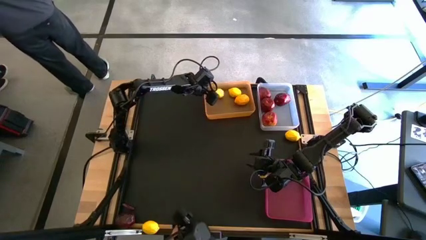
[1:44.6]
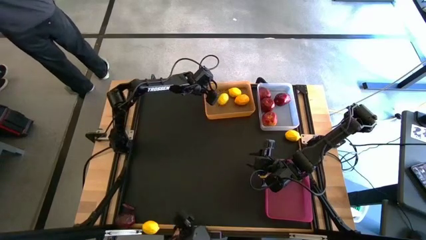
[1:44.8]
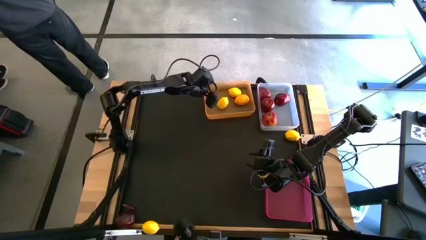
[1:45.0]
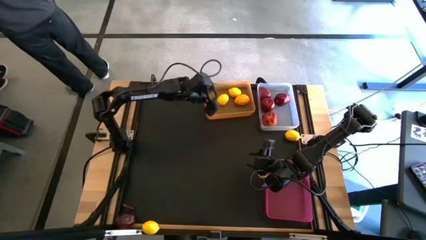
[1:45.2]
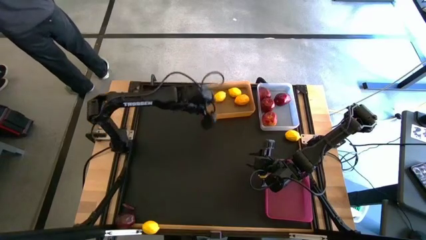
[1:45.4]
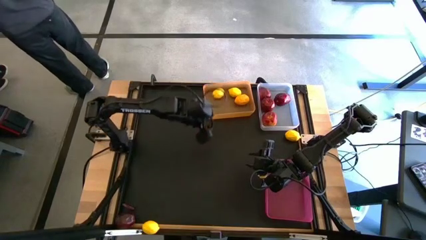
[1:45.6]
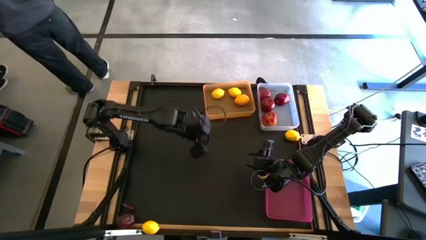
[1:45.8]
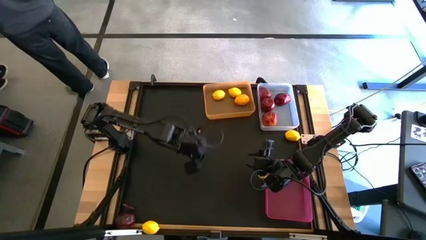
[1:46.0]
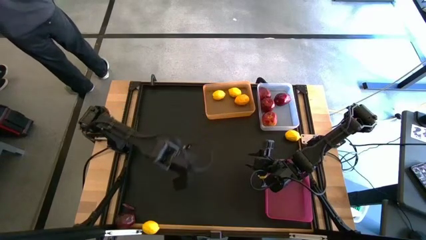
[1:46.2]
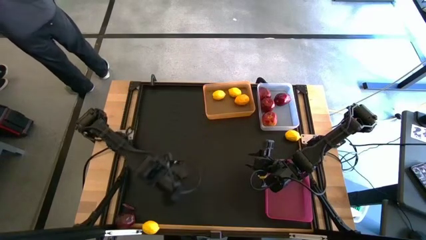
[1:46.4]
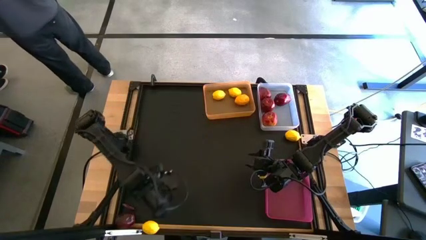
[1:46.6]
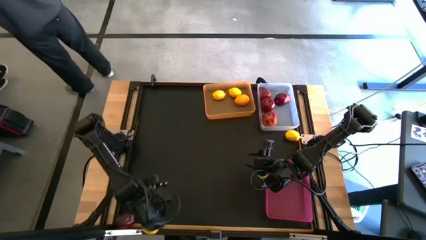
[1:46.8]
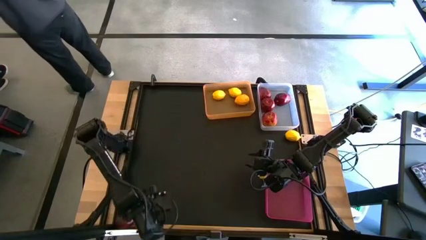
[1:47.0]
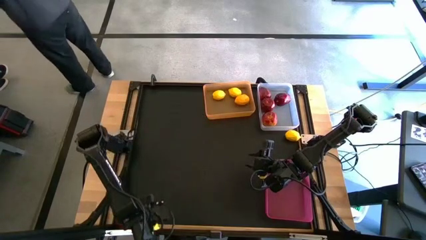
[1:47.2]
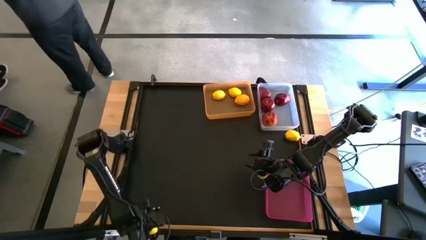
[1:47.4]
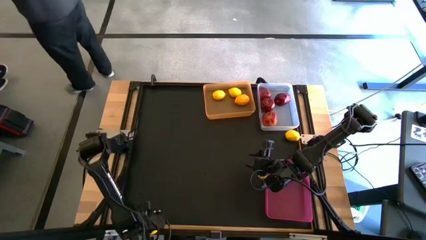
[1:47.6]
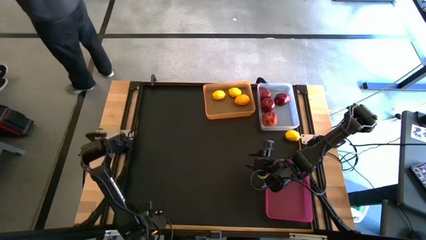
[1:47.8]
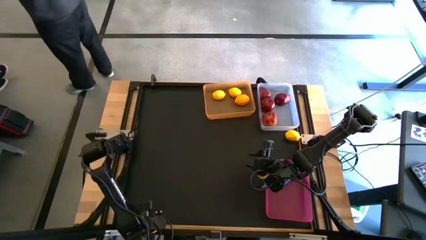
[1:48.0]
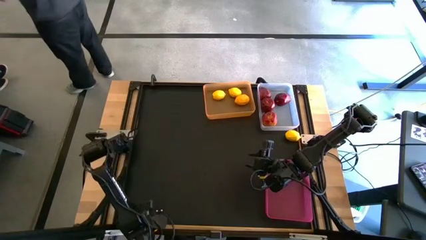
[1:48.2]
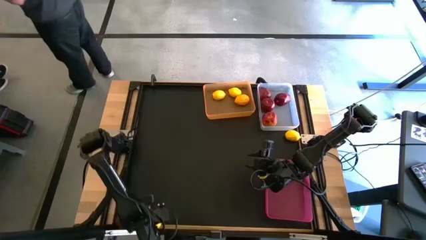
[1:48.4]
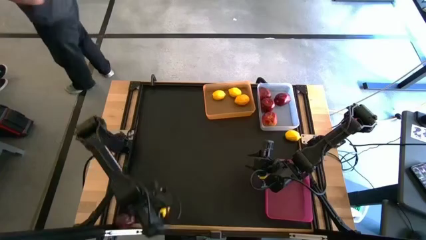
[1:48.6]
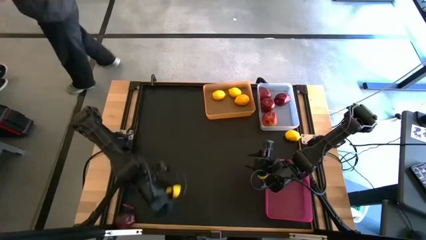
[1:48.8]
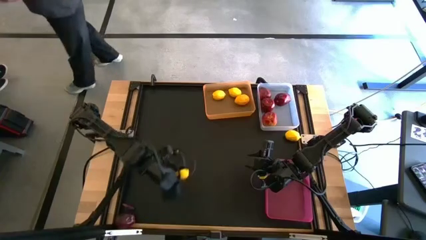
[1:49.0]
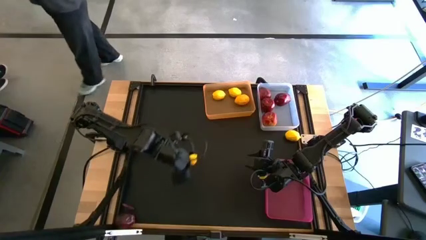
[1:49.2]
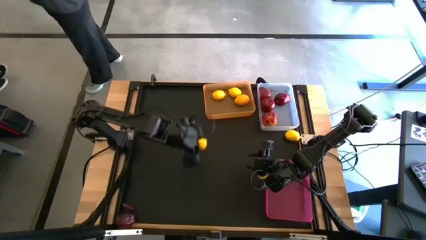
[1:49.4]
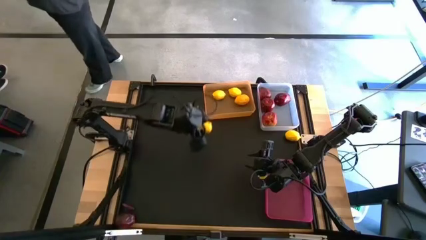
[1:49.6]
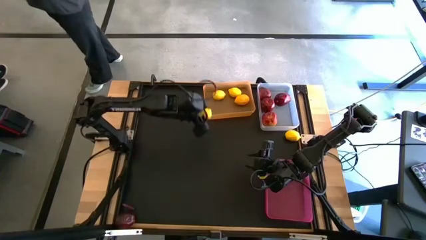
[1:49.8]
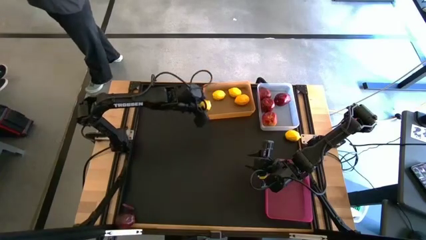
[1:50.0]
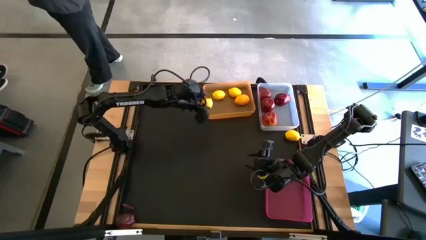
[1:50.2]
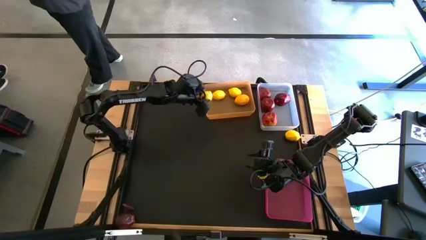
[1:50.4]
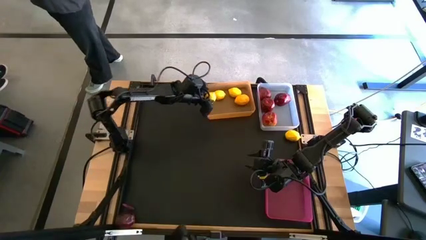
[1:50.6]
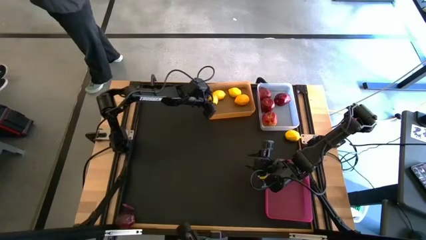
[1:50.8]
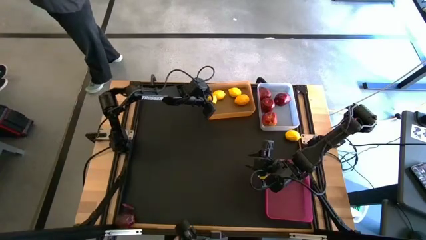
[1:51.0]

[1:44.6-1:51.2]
Task: Sort produce into baskets
Put the yellow lemon into the orange bin

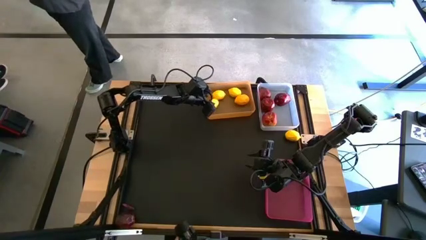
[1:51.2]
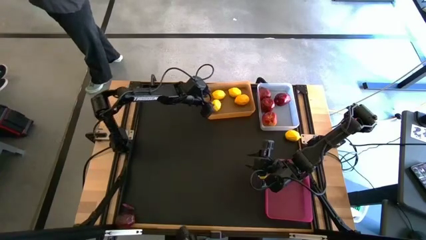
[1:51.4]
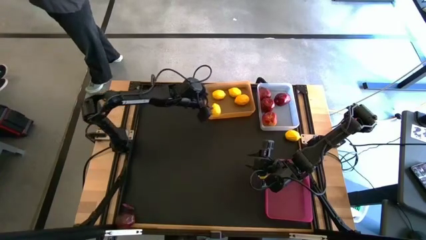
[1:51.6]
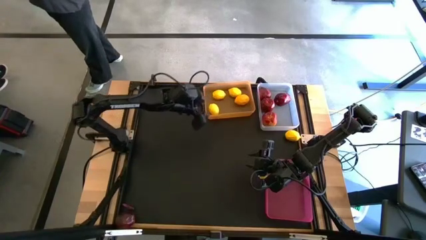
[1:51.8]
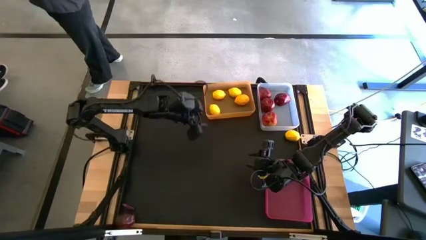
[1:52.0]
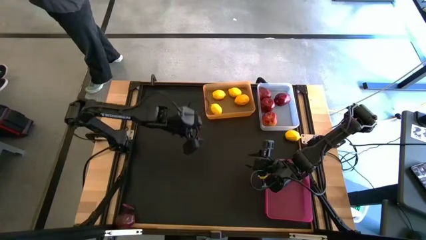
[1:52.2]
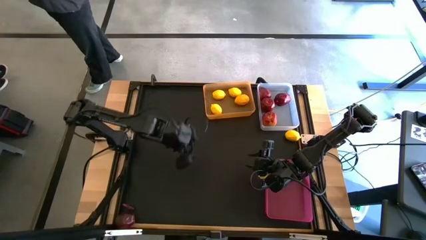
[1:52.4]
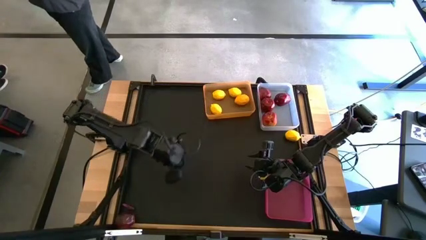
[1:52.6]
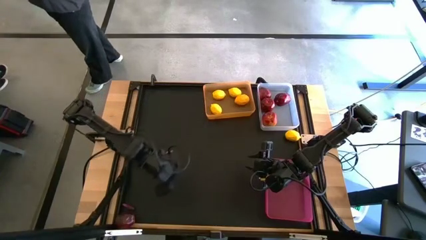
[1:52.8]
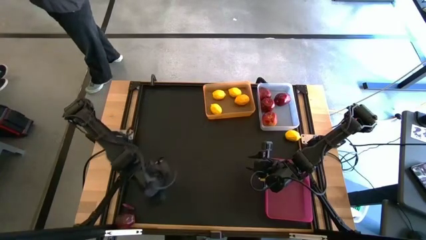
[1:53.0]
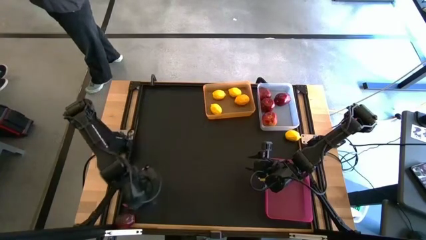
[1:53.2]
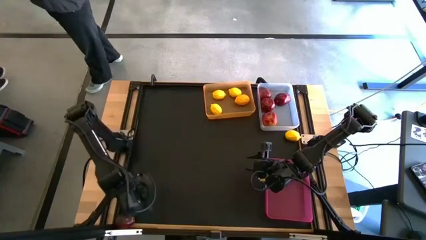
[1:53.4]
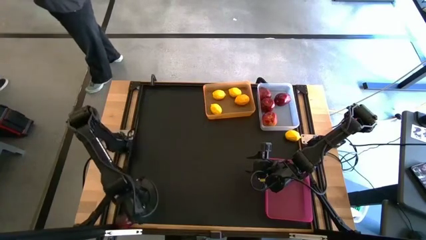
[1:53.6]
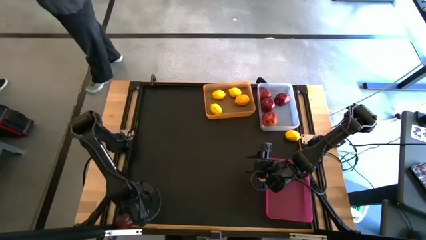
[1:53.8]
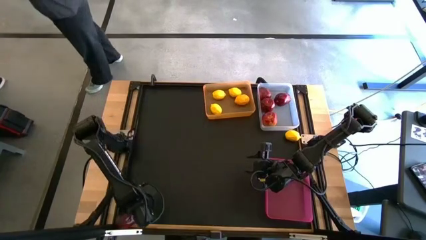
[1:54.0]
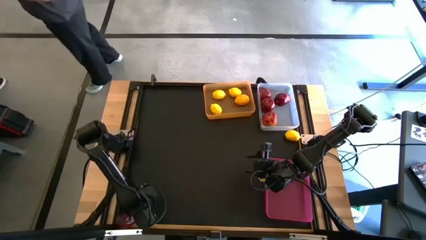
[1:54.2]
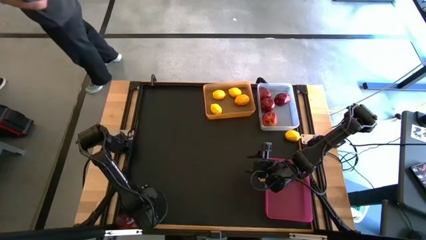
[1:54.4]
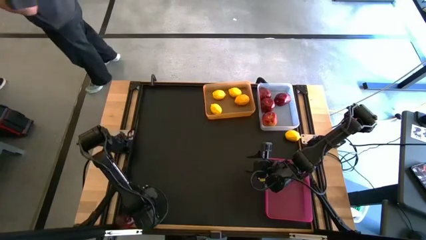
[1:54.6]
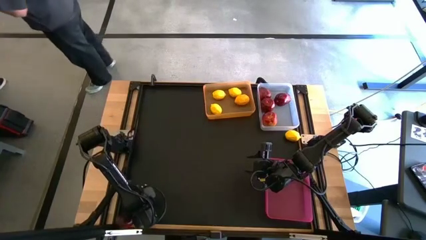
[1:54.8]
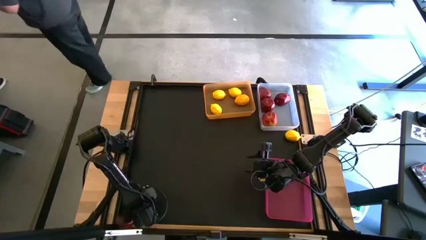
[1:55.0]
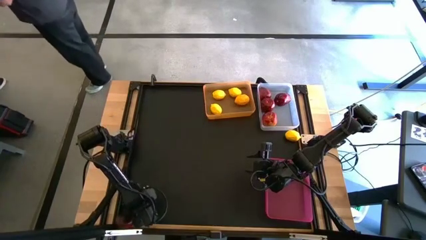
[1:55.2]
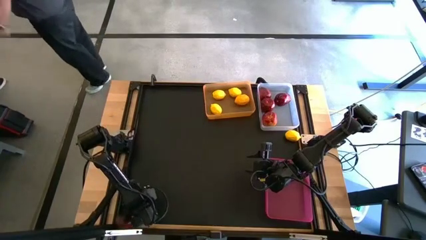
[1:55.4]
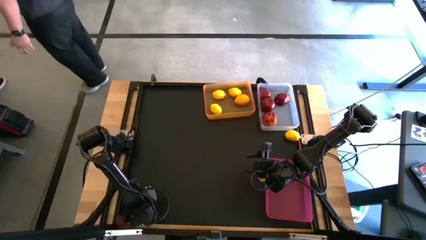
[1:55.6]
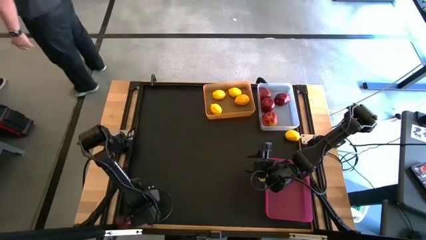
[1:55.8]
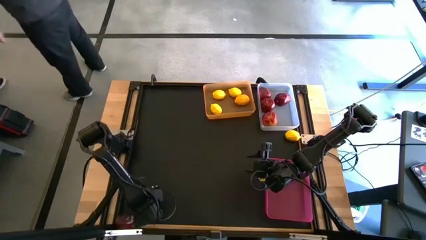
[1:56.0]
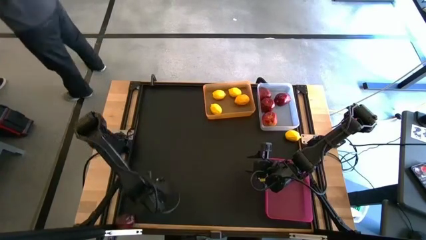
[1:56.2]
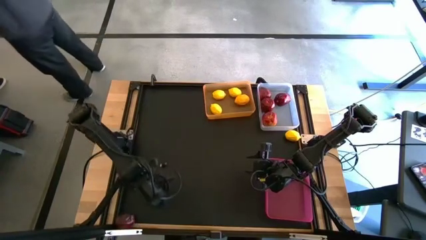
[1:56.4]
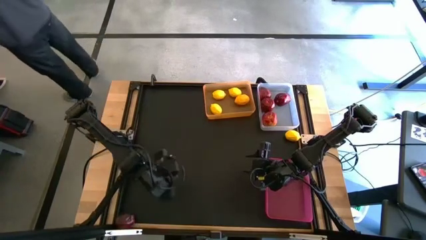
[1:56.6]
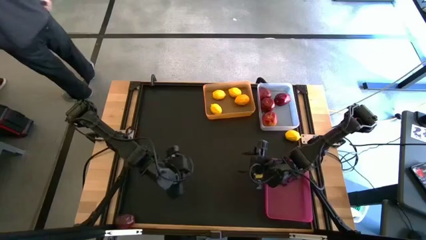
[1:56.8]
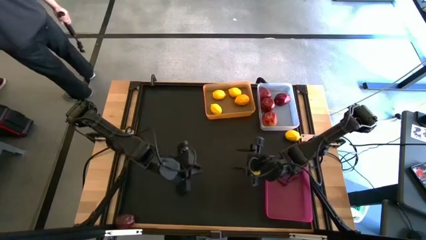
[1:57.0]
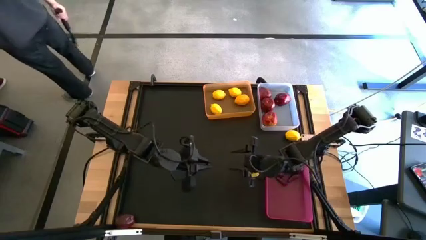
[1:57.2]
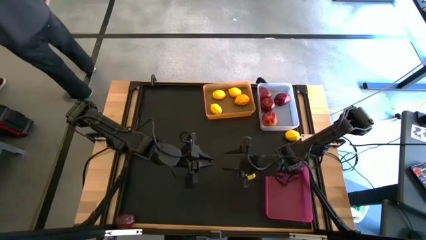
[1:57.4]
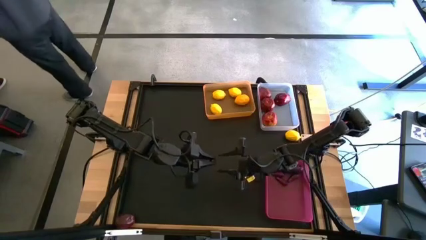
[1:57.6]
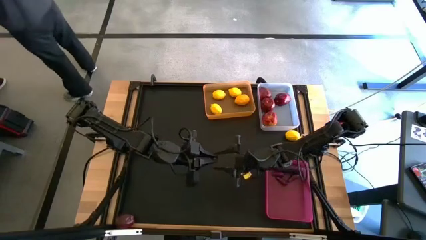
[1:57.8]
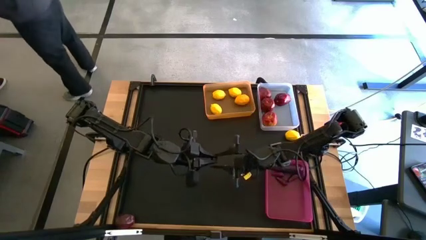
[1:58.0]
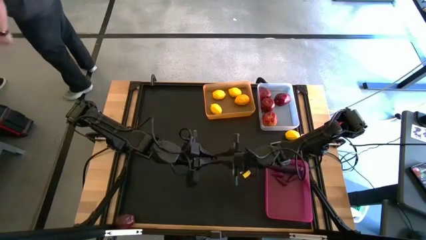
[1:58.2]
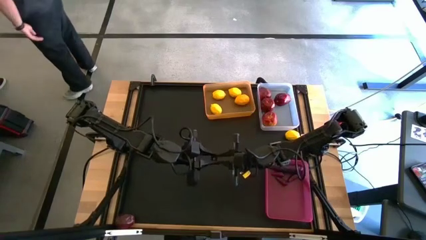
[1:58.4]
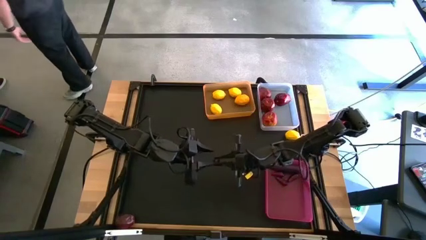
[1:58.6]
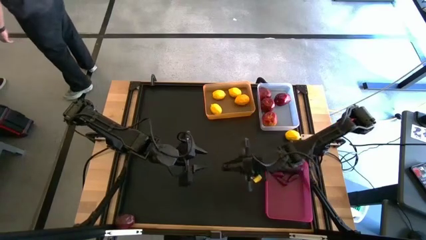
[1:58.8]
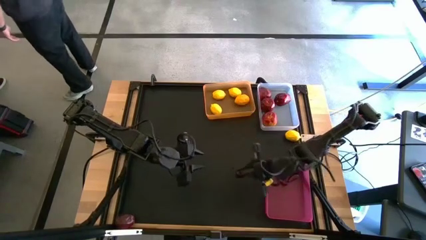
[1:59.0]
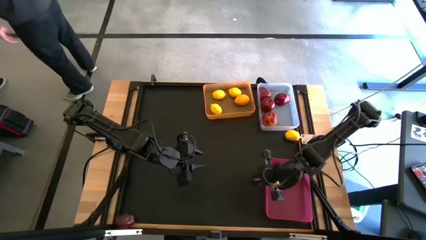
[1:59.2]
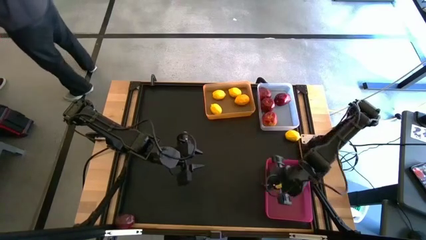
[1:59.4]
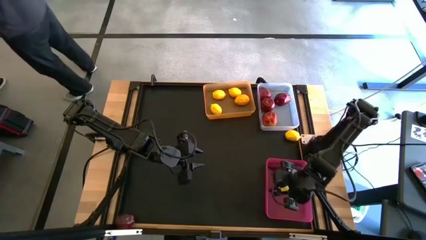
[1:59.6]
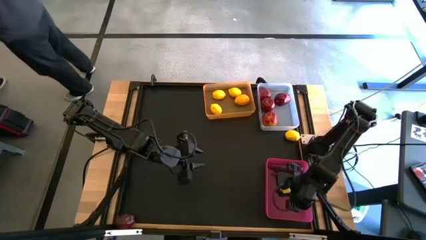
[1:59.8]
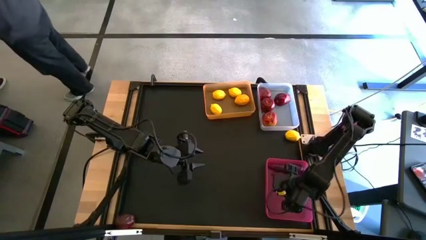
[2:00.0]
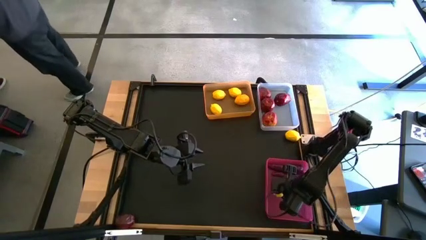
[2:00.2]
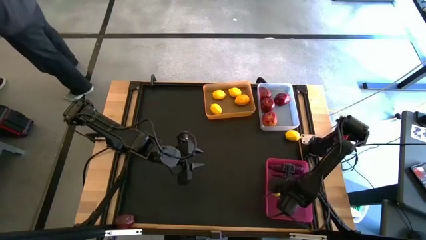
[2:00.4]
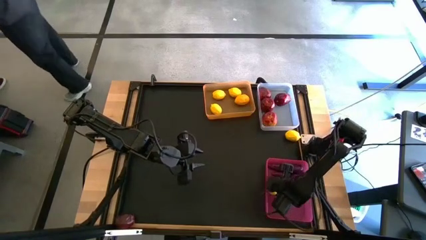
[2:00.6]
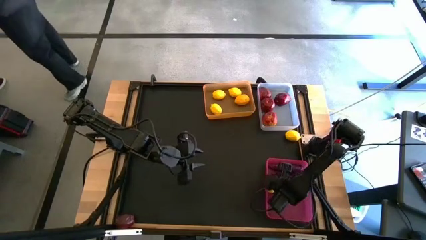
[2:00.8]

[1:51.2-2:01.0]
Put the violet eggplant into the pink bin

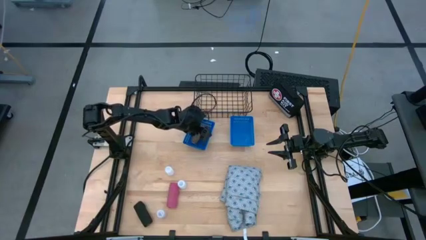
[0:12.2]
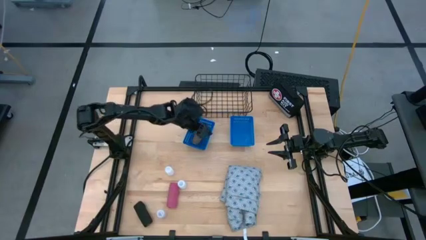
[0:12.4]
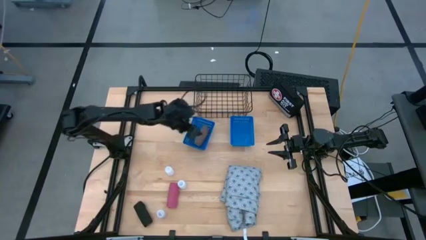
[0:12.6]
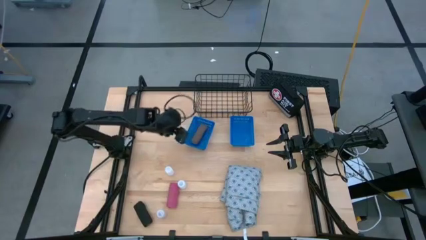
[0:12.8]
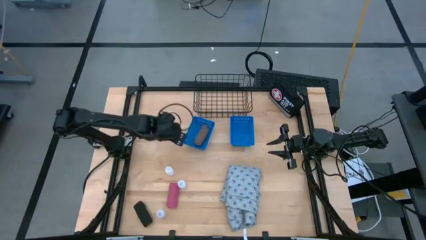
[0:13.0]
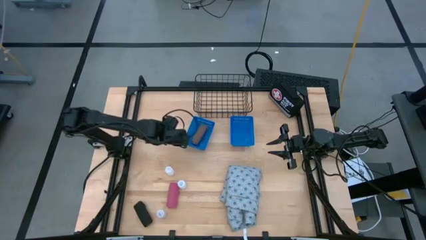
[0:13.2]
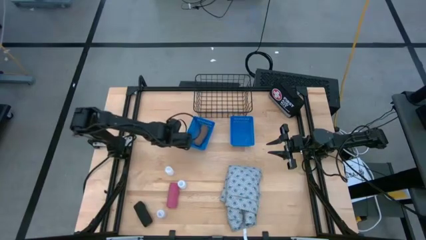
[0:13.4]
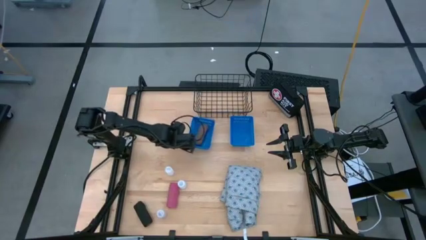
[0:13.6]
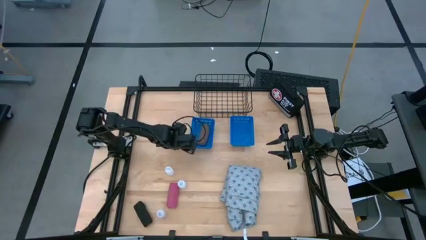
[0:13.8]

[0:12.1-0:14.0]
Task: Pick & Place Medicine items
Adjust the left bin on the table
